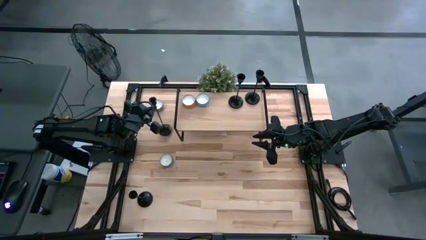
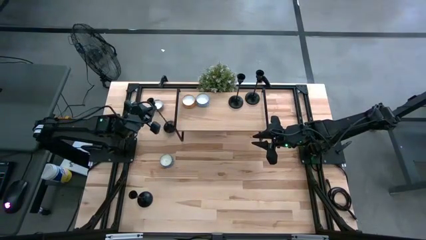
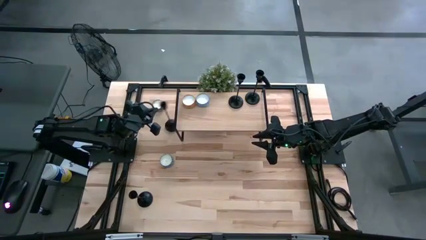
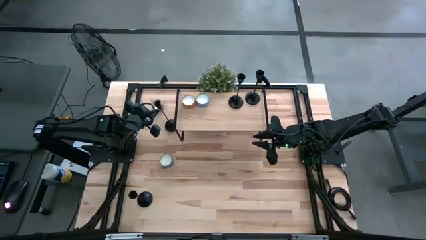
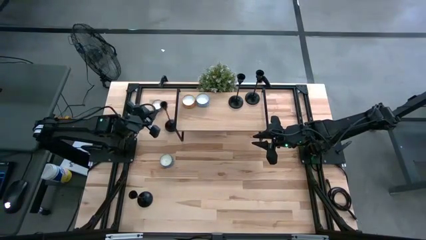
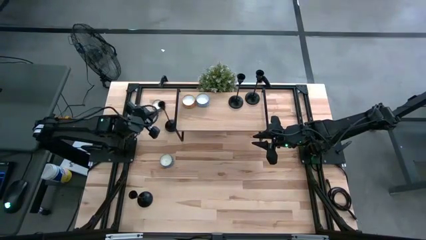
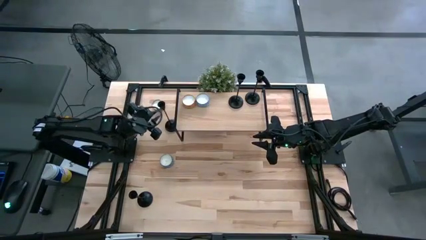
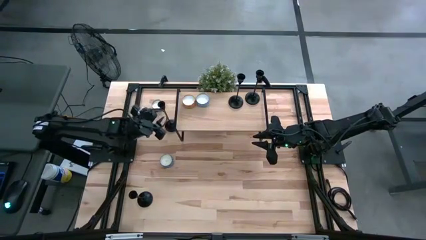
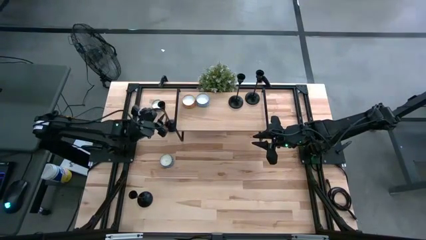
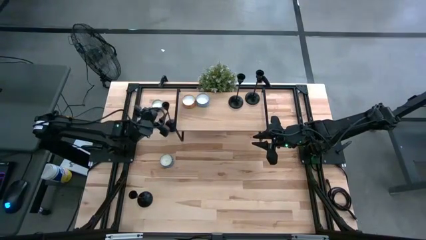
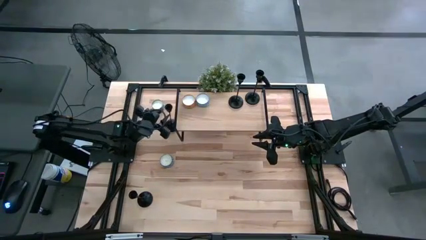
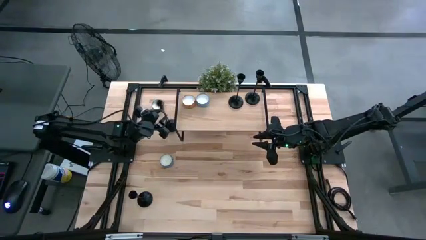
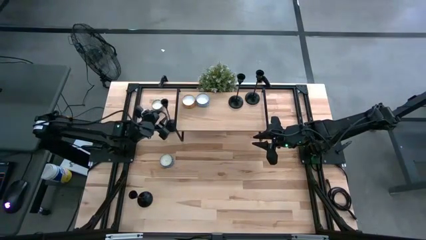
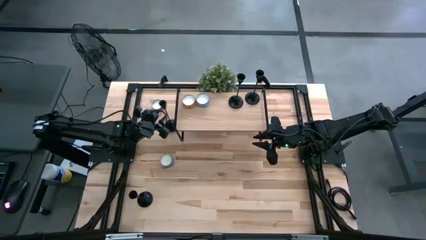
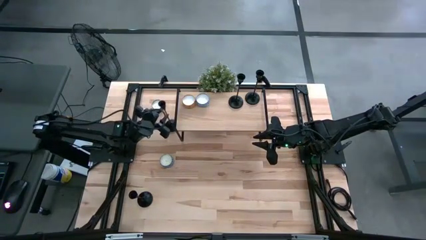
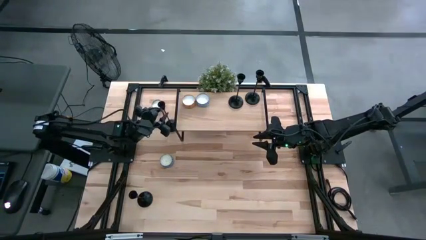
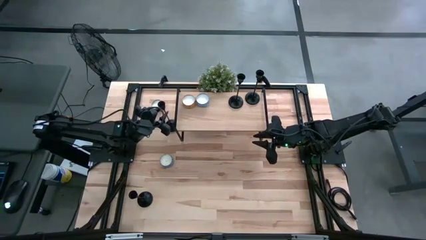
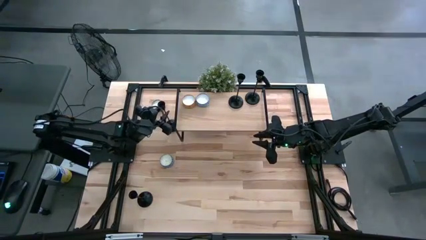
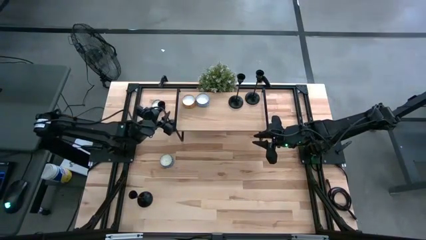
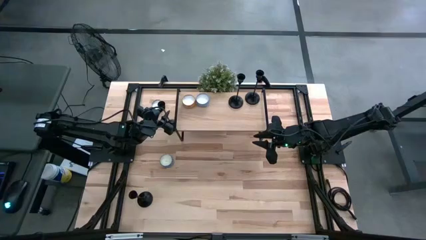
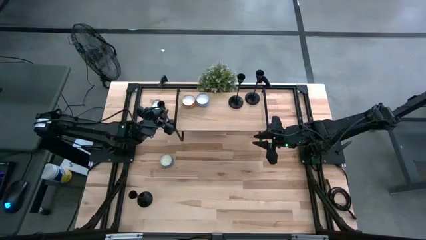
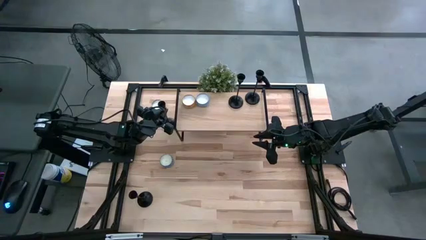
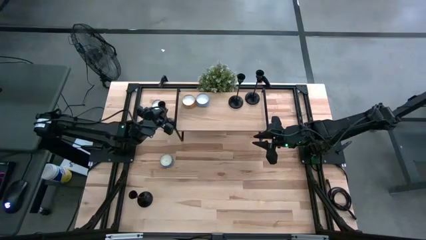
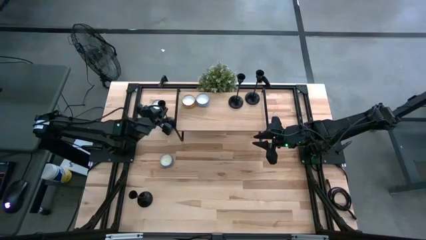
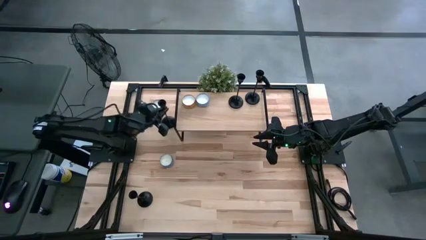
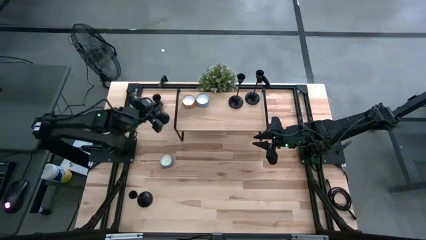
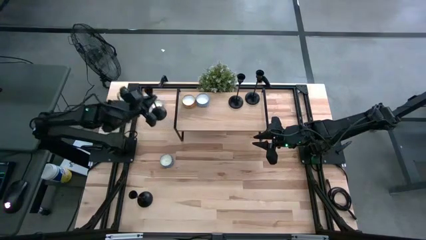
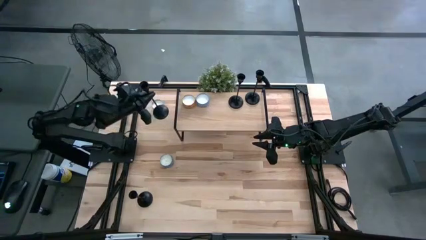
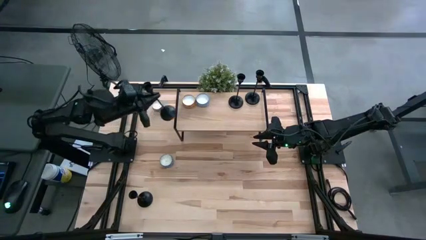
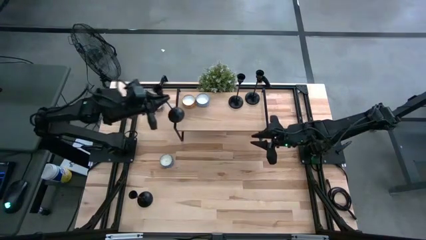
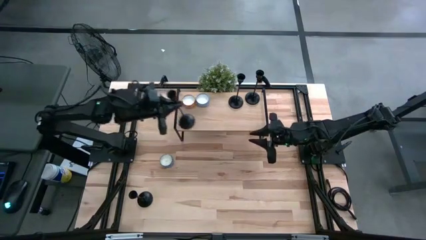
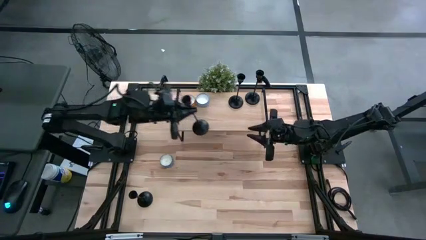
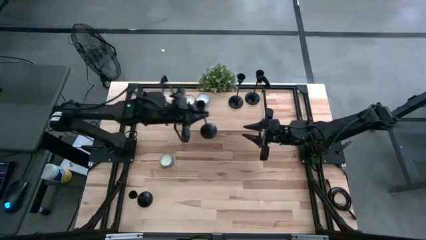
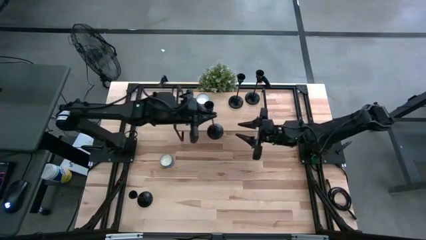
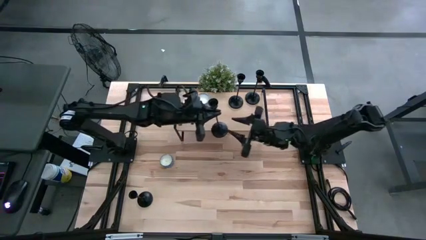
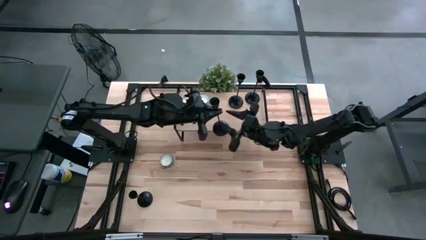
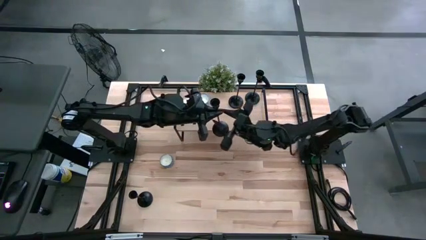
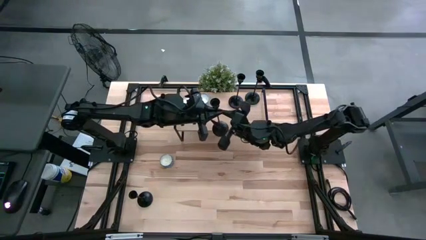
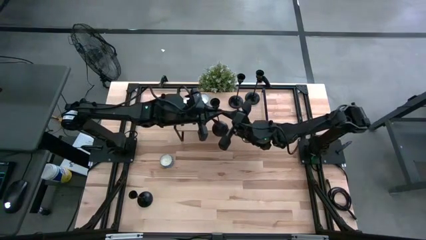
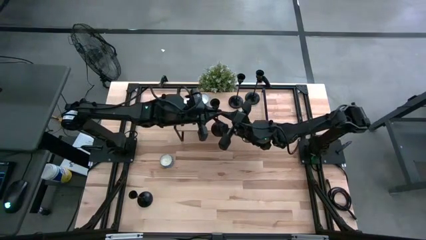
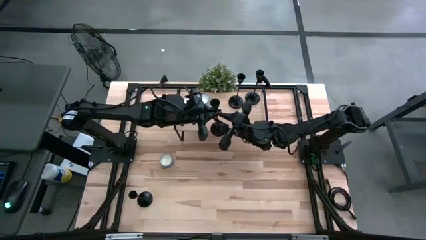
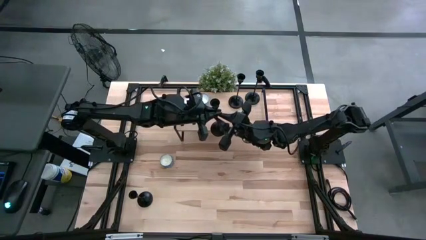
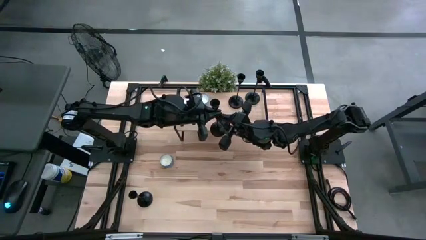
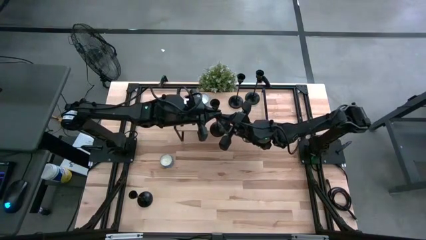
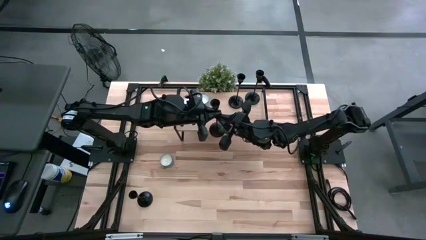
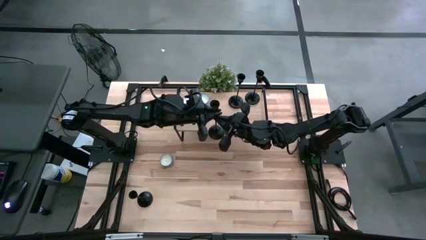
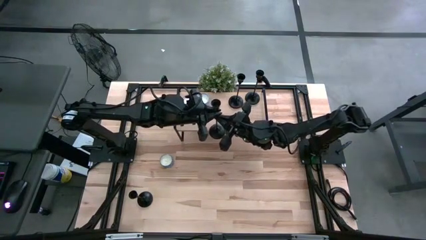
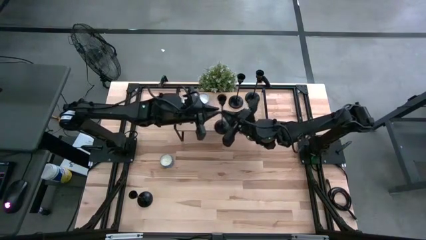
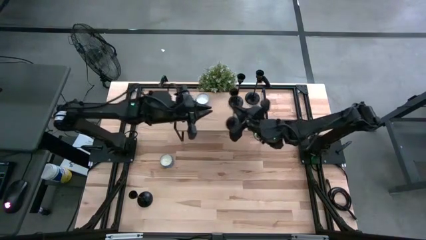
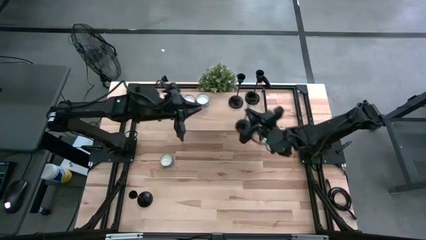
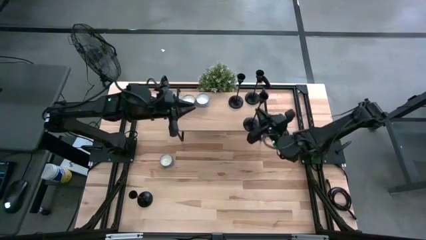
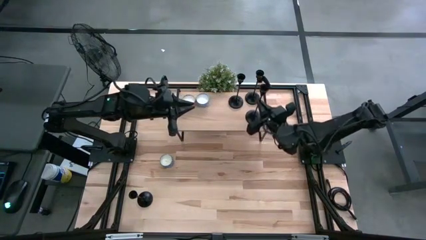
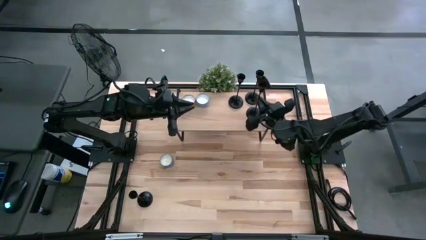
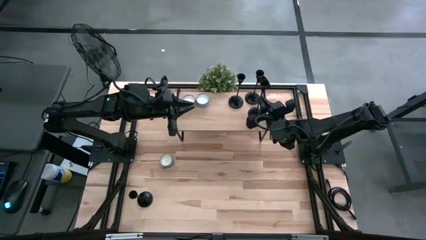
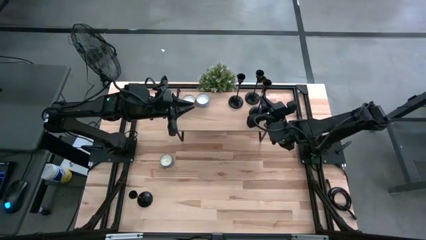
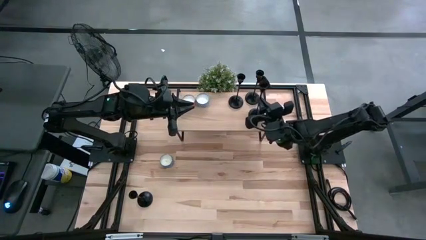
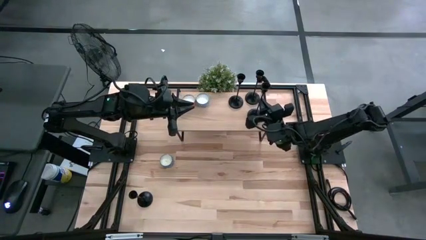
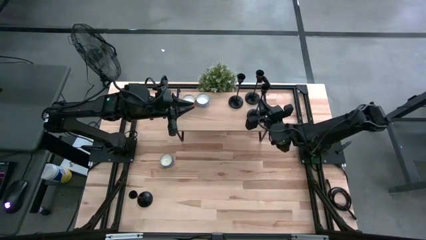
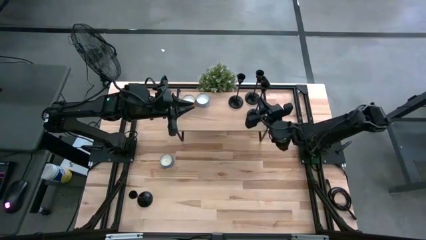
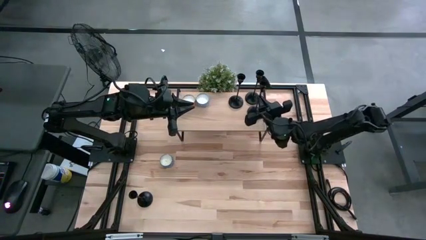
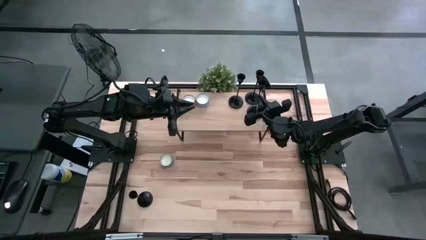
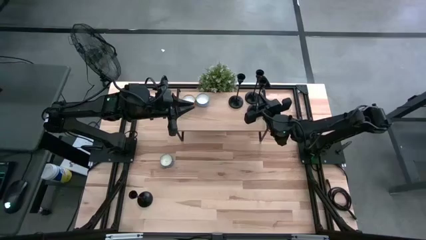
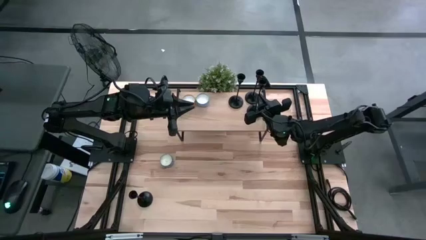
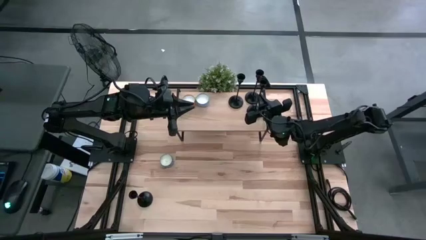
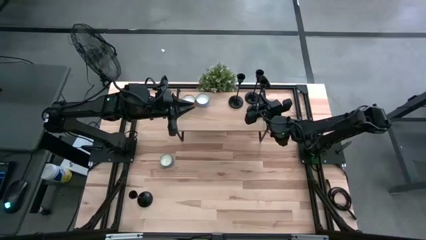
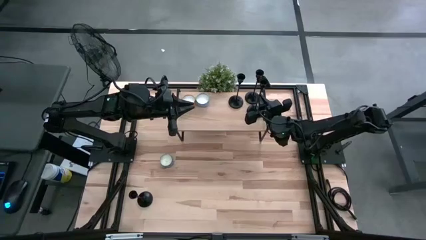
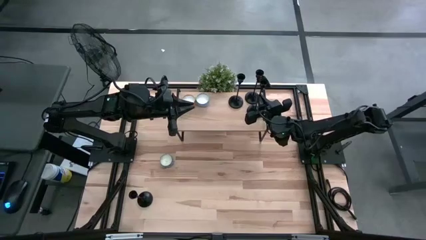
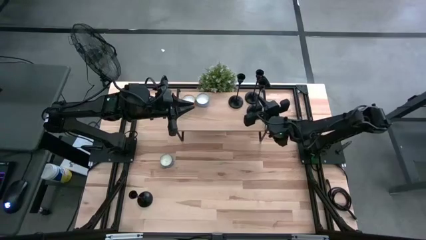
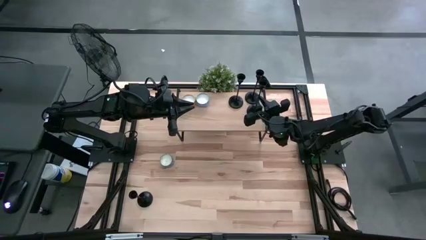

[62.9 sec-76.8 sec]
Task: Pick & Place candle stick holders
Put the black candle holder on the shelf aligned with the black candle holder

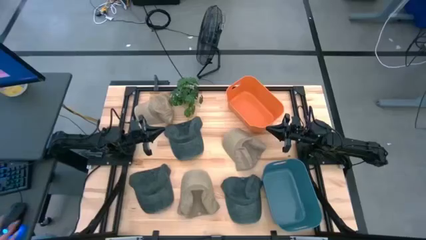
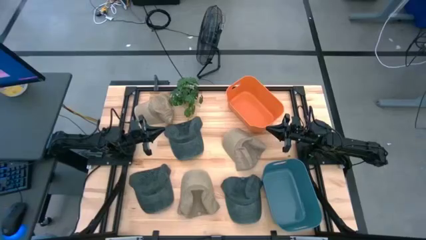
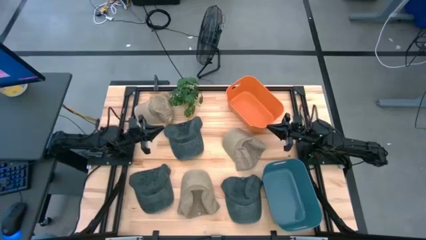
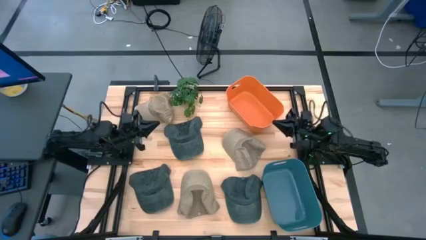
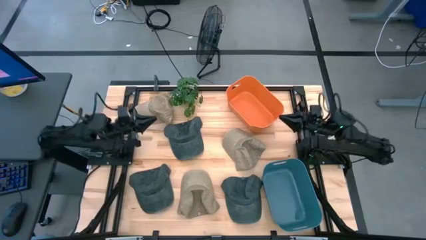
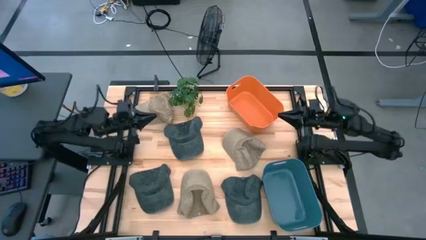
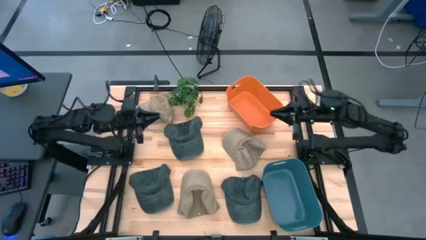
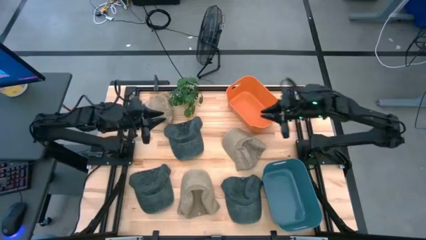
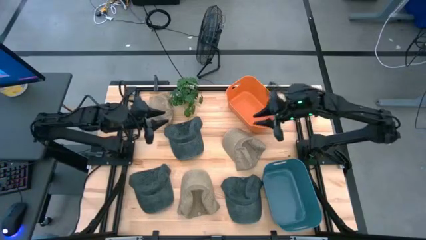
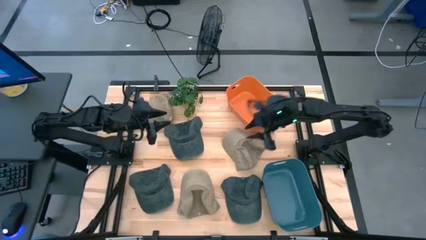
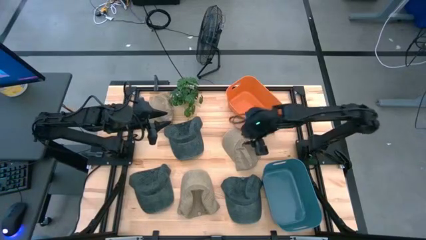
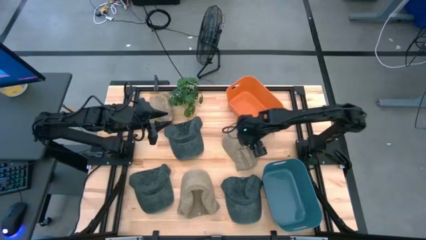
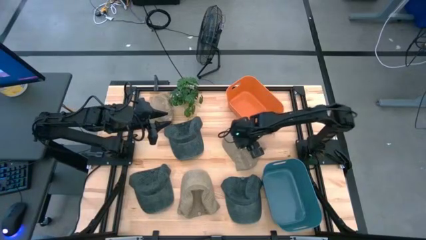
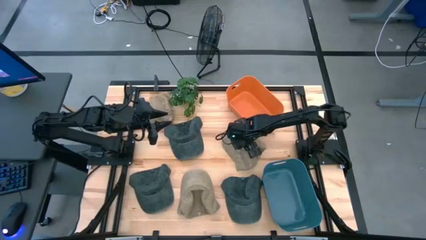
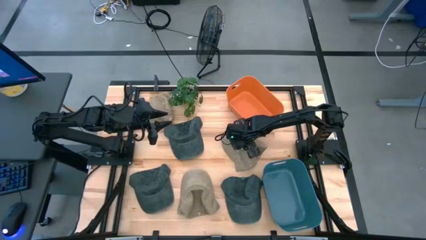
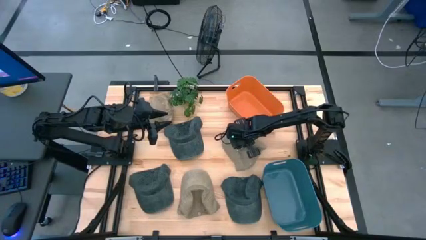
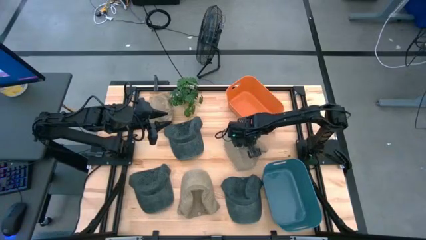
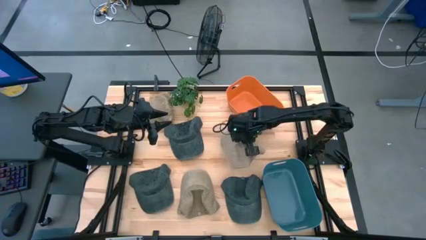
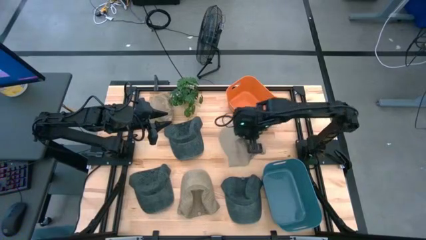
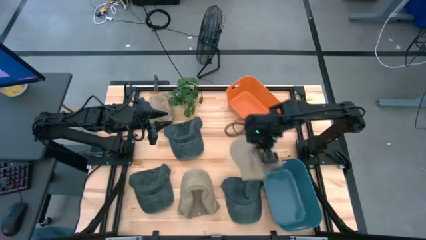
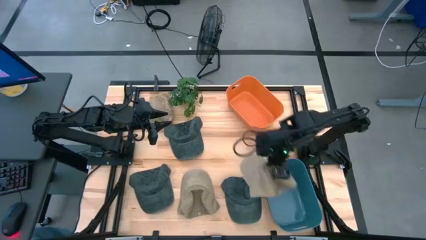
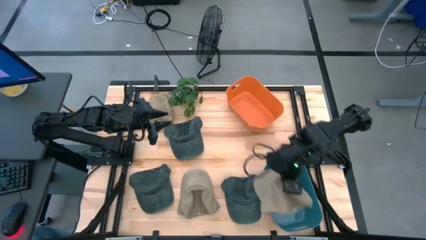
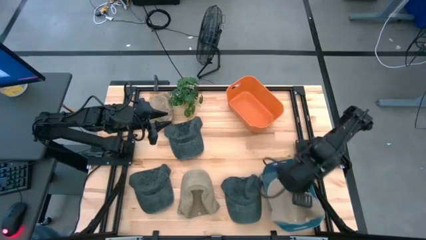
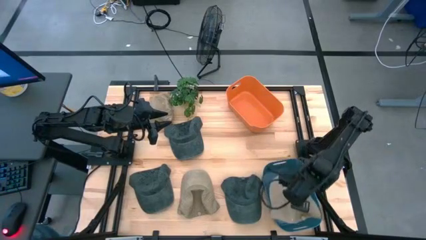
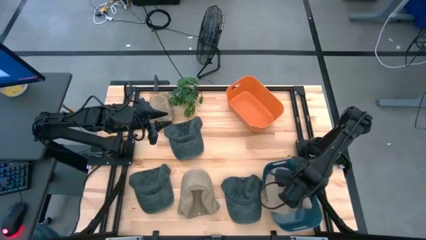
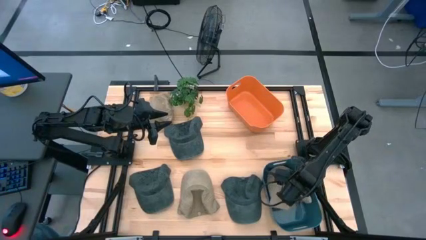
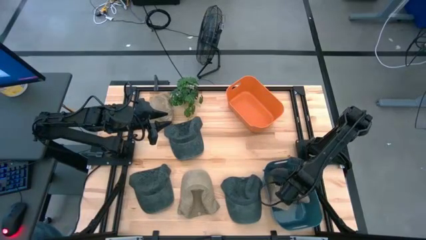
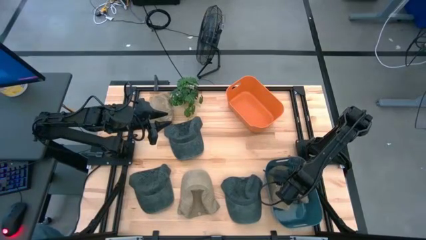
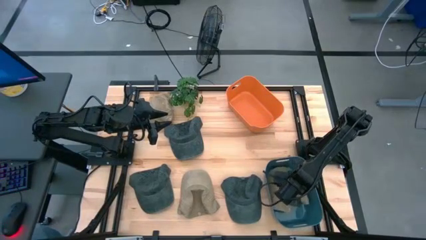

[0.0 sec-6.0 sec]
Task: Pick & Place hat
Put the right brown cap into the blue bin
